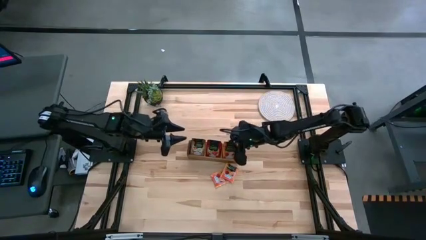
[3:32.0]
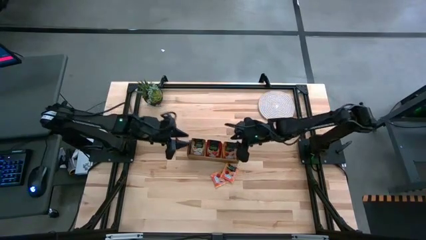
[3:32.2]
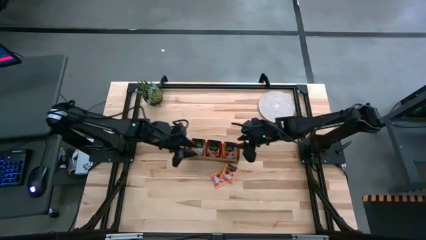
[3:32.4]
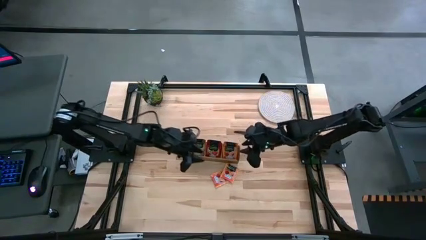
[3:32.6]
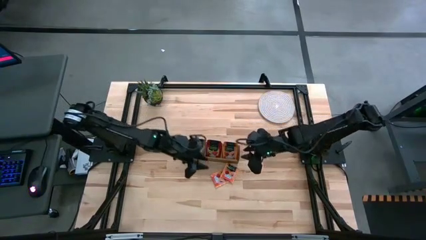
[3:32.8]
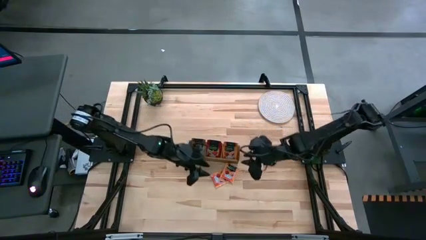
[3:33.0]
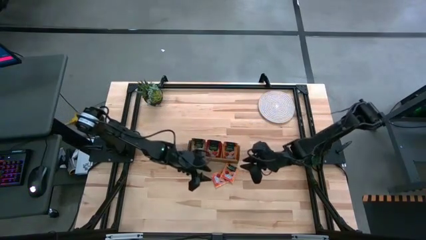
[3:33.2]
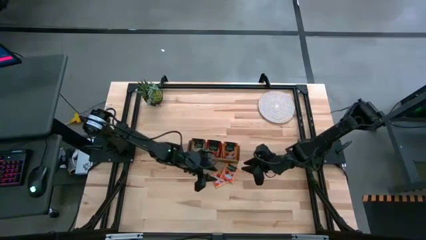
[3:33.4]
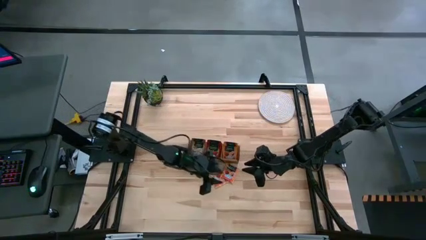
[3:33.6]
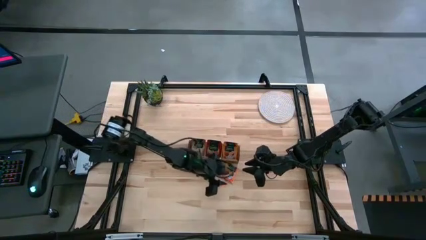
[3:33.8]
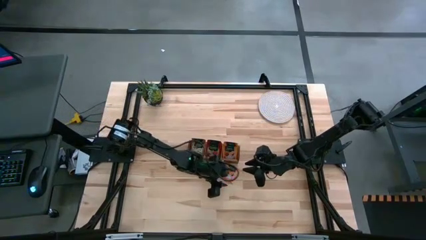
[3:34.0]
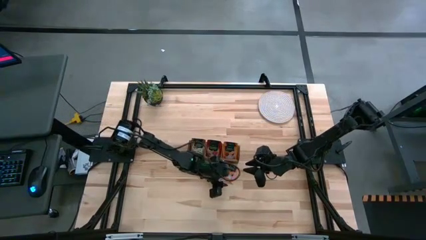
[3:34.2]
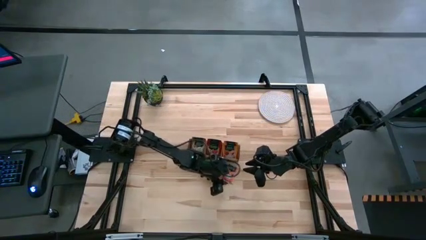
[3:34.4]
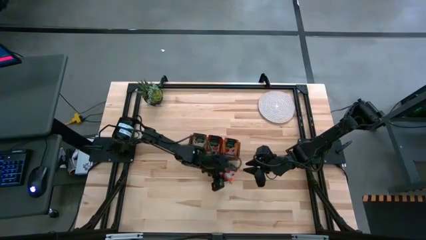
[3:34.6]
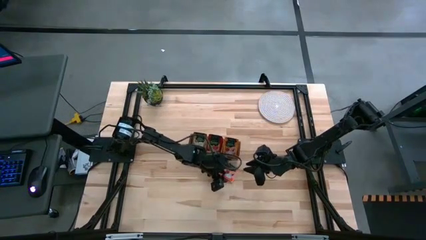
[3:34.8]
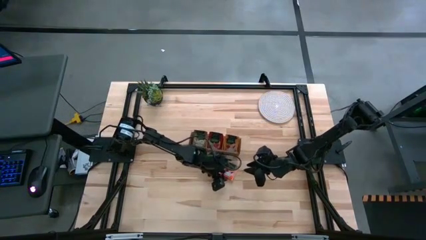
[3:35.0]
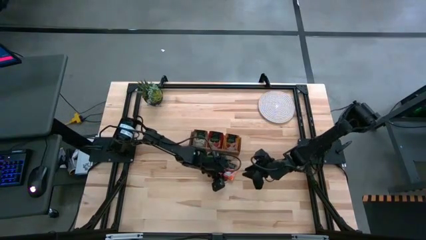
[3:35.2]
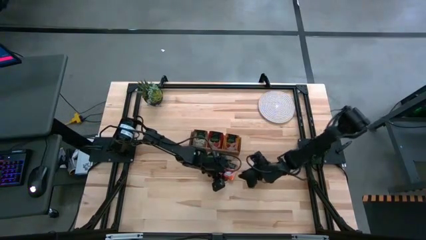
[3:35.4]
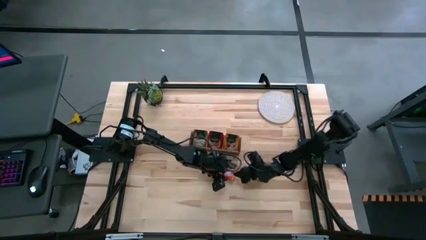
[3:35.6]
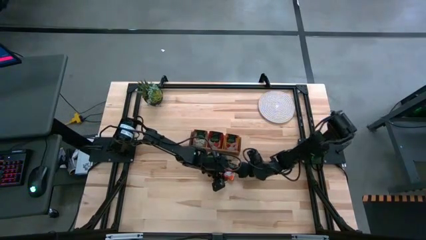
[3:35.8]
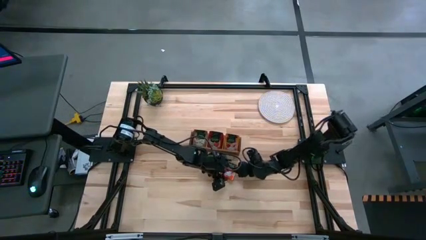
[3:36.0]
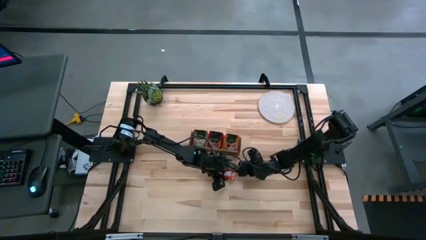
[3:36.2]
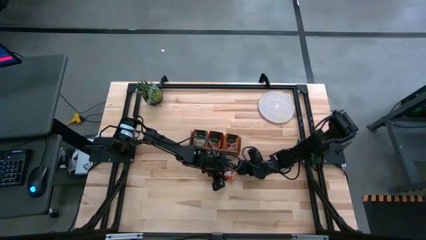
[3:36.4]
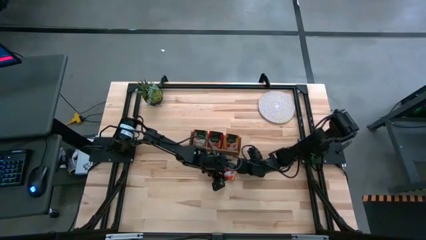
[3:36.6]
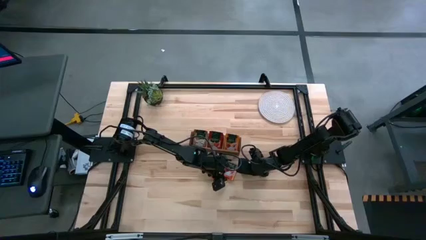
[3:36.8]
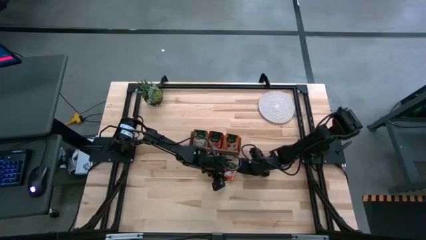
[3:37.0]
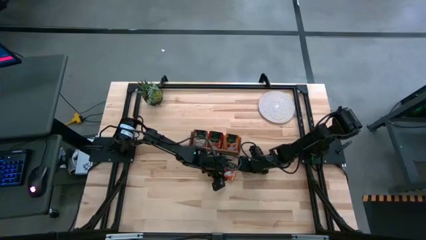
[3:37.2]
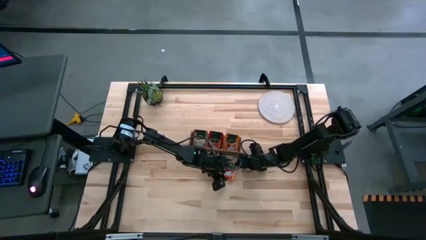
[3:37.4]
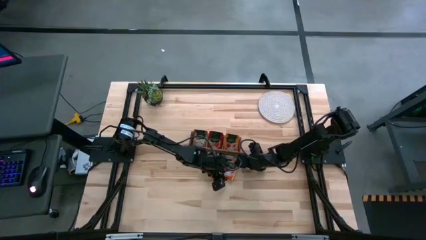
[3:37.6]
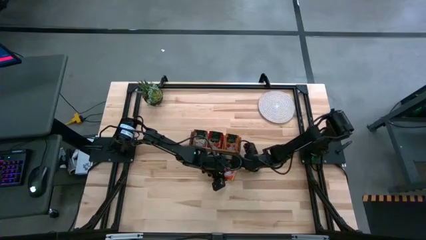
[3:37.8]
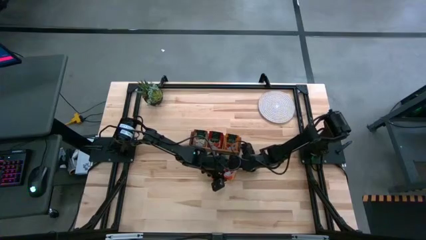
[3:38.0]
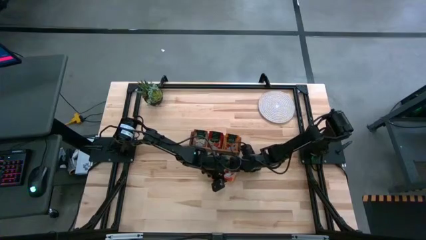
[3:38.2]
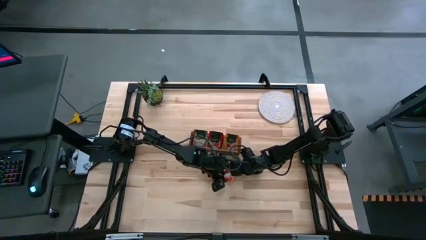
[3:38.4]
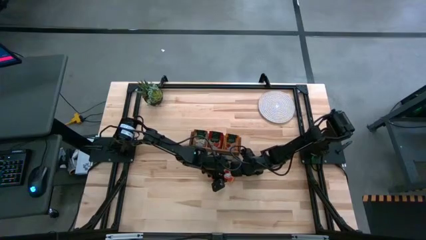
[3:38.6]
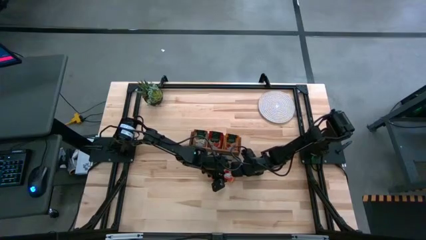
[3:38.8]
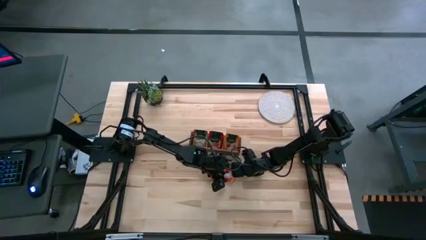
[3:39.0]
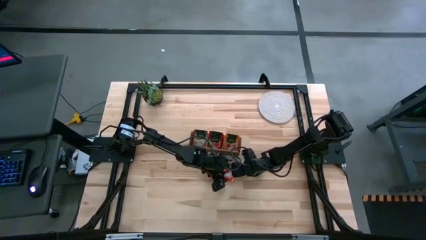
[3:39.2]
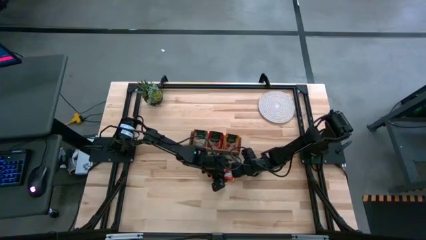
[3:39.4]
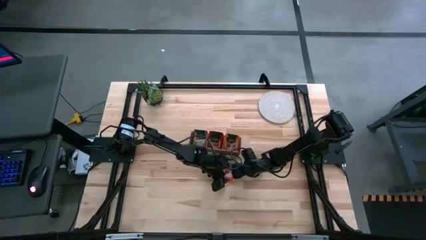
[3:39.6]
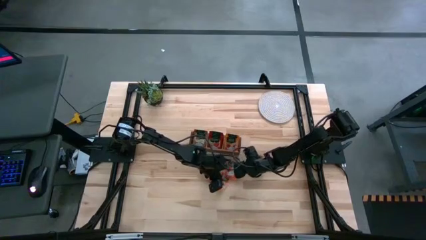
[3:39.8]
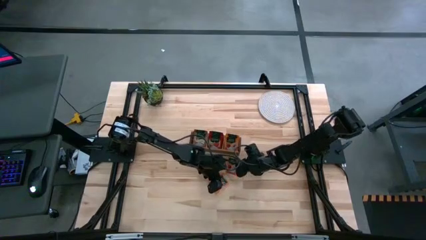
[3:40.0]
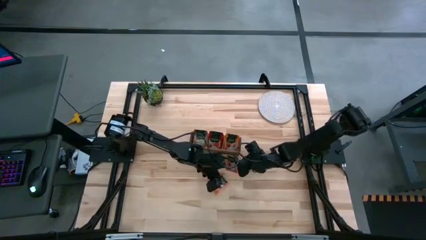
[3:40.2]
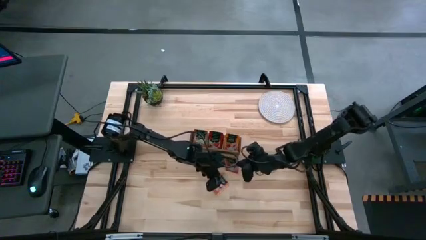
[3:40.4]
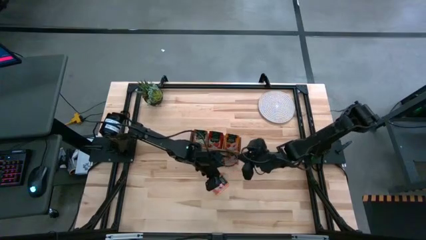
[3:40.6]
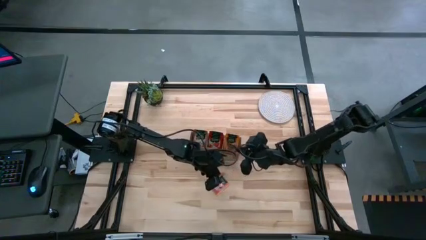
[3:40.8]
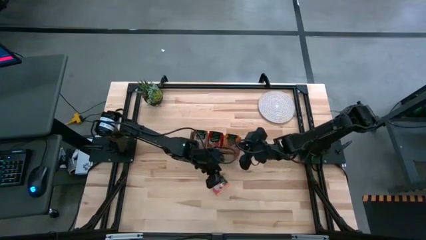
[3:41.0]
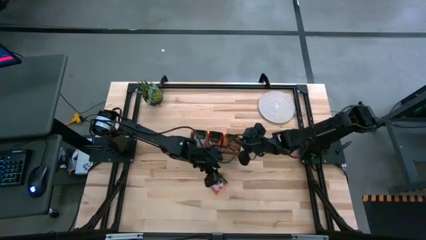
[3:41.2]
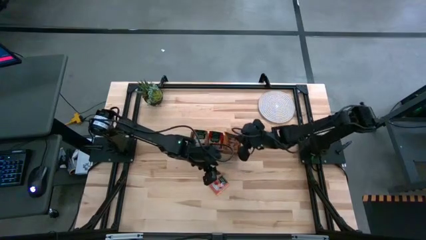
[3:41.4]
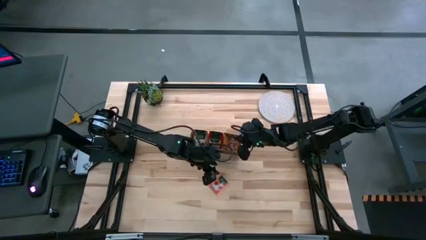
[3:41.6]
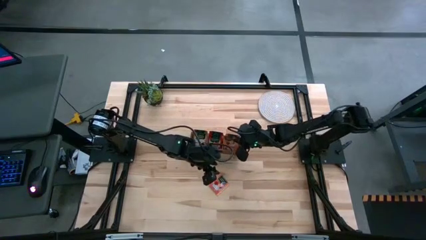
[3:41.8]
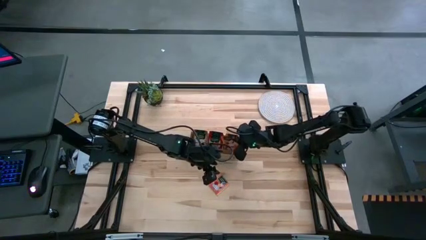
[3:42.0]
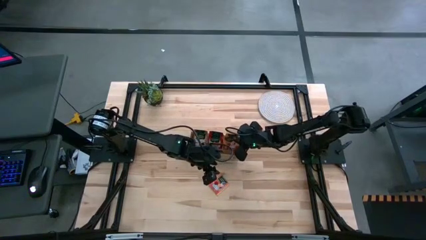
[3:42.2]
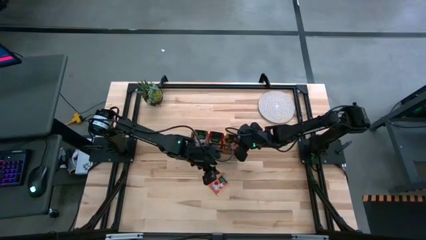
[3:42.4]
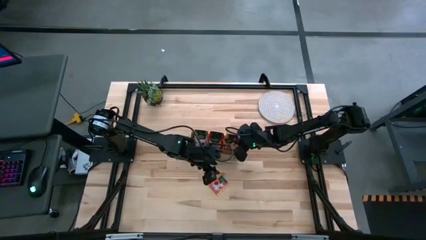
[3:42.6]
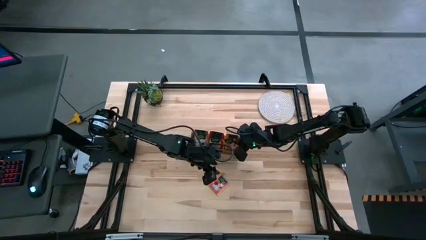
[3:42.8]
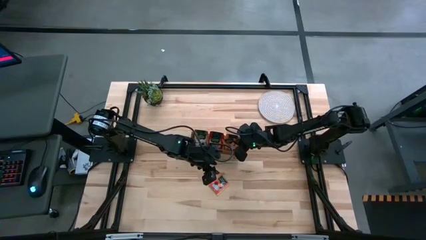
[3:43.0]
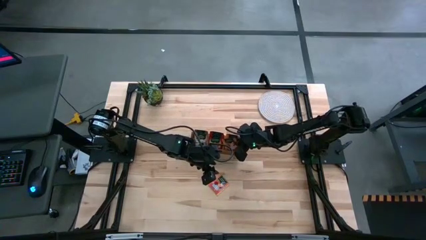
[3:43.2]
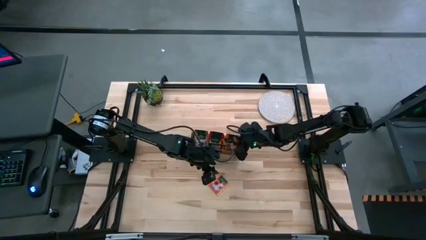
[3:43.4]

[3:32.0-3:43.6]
Task: Pick & Place Tea
Put the orange tea bag into the right section of the brown wooden organizer
